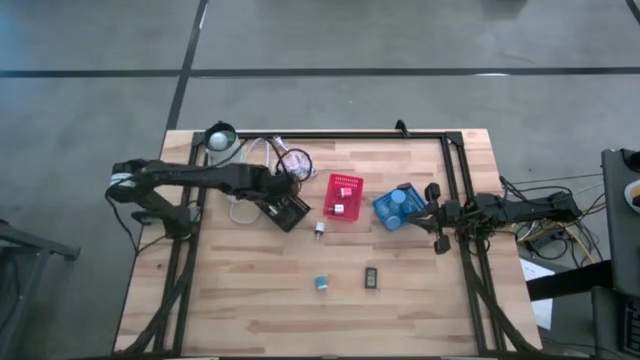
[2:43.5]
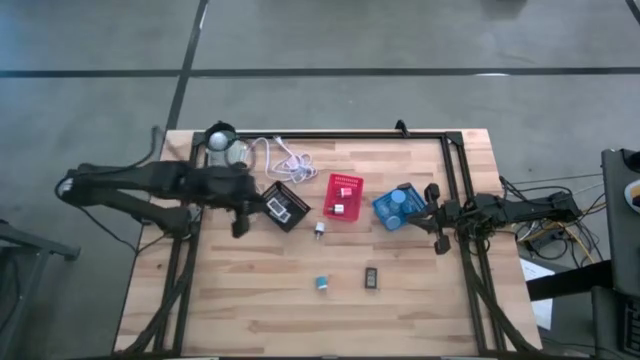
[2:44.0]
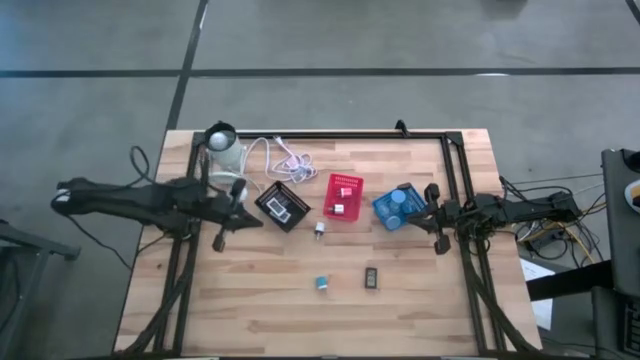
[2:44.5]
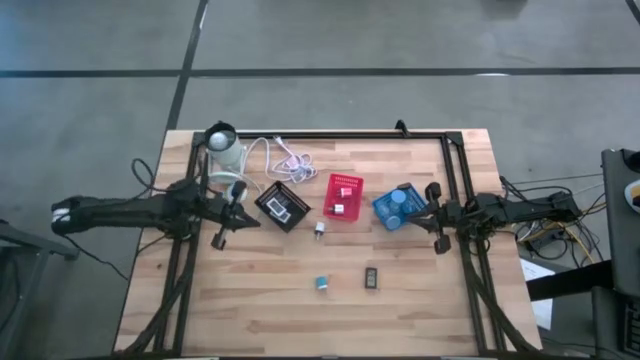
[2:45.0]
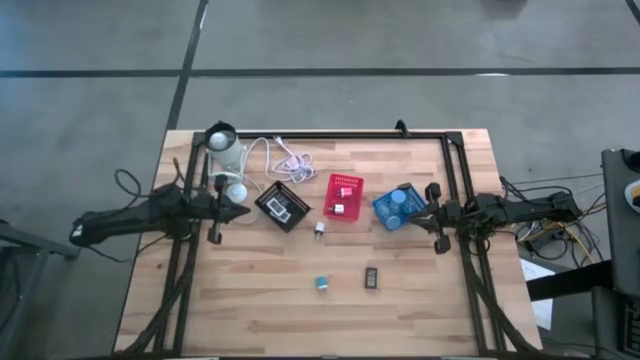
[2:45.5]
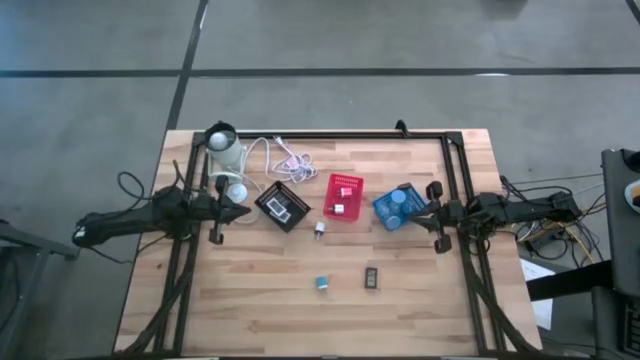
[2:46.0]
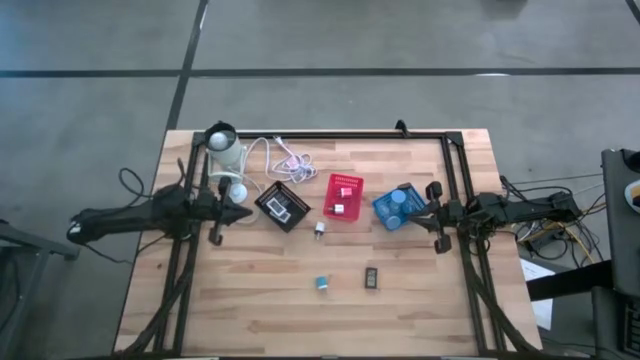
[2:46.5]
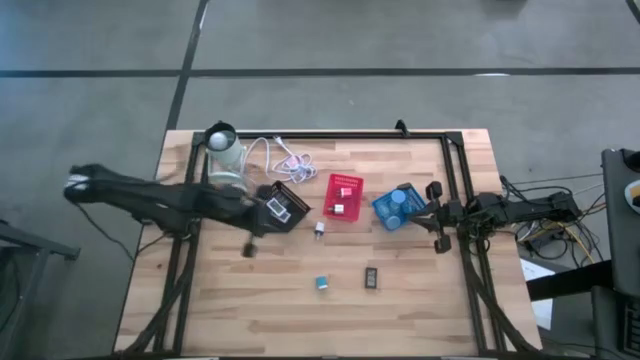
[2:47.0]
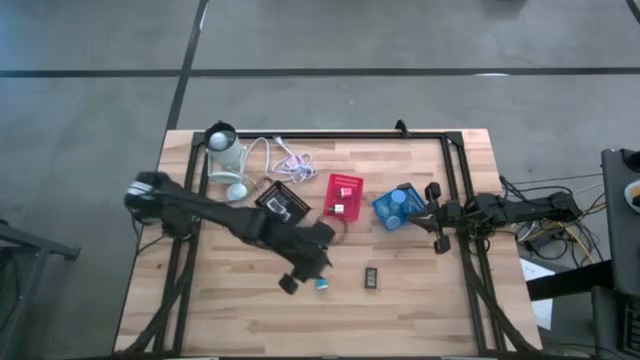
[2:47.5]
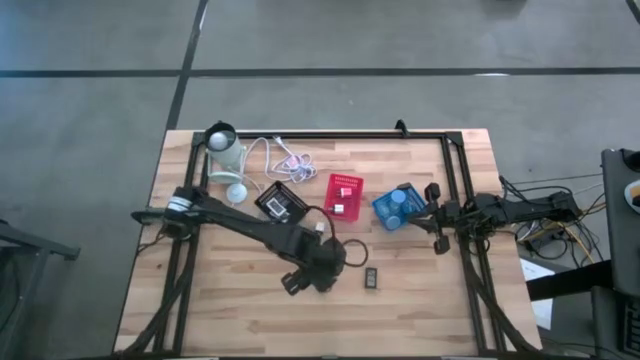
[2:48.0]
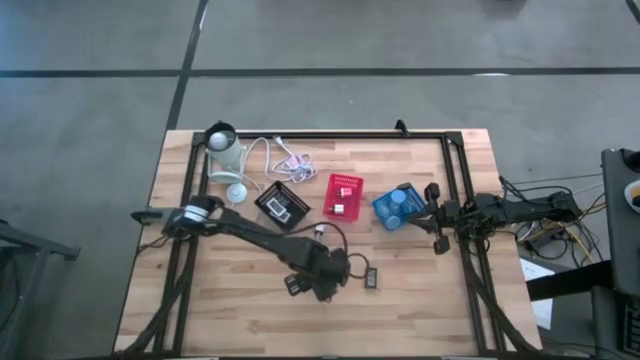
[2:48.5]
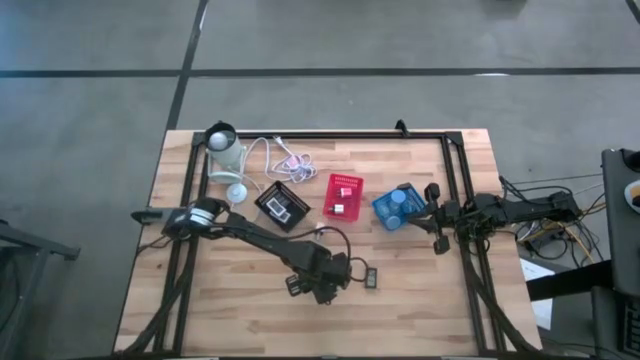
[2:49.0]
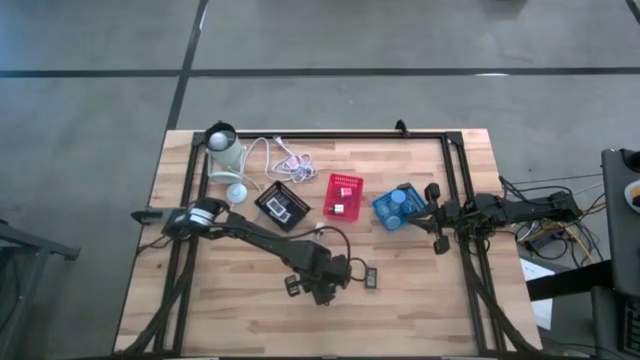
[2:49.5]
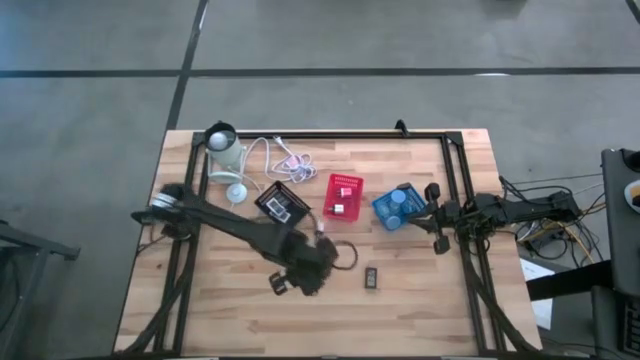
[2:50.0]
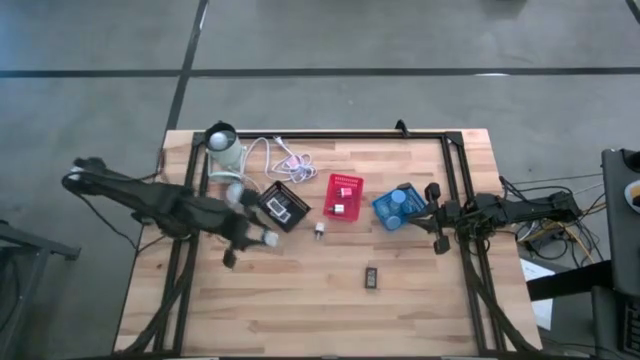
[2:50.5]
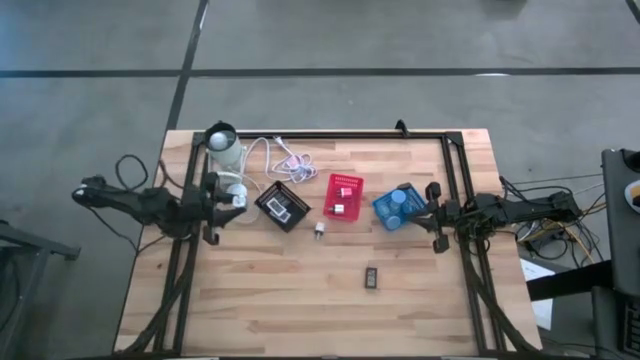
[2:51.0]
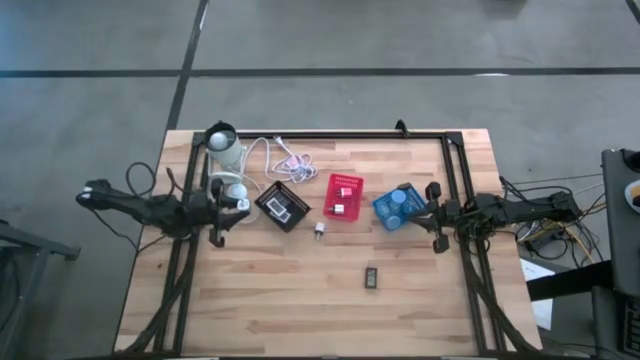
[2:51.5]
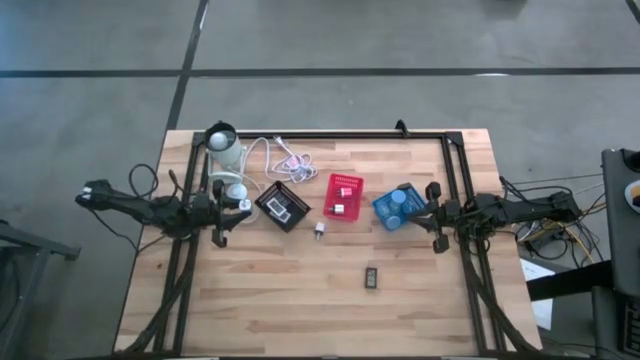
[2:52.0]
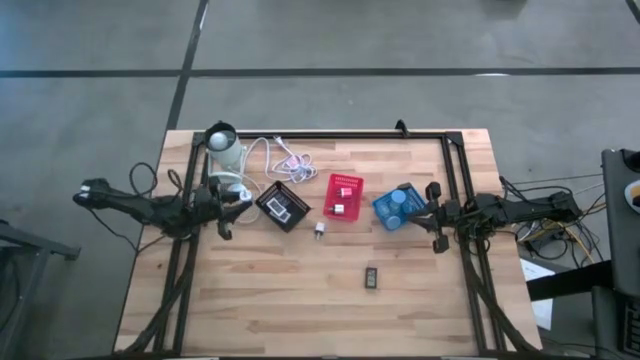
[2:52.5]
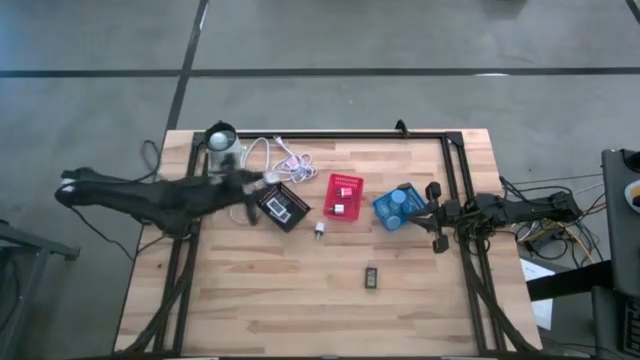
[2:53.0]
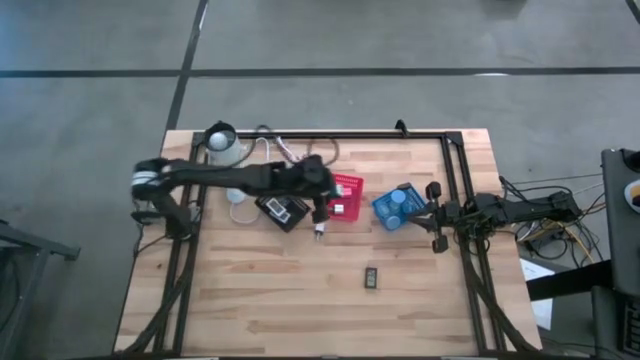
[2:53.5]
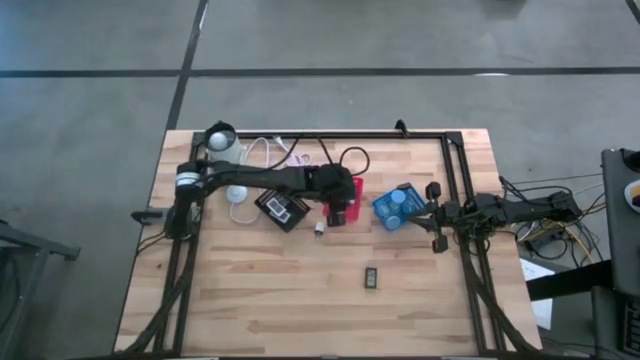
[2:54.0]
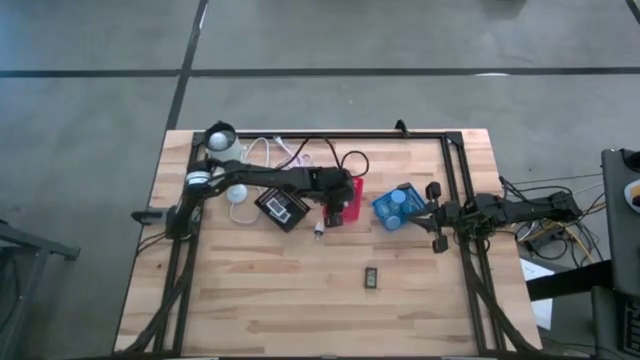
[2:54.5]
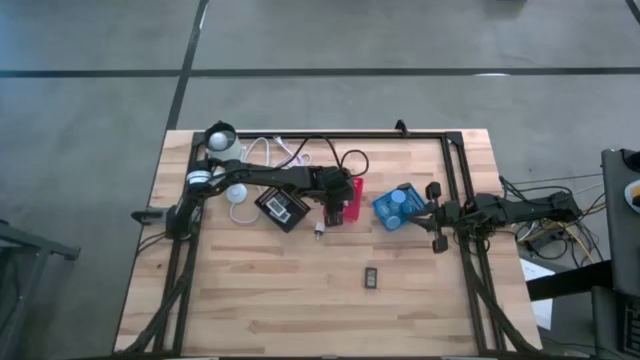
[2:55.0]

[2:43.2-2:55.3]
Task: Pick & Place Office items
Put the blue charger adapter into the red basket

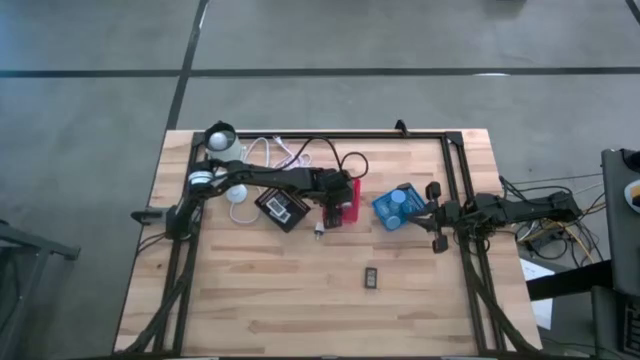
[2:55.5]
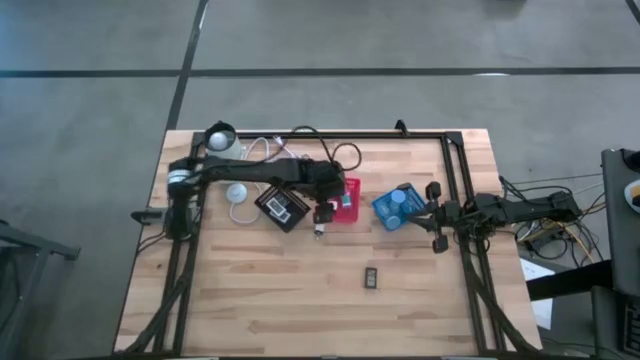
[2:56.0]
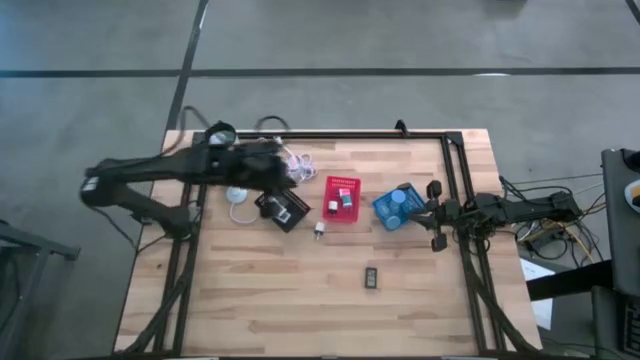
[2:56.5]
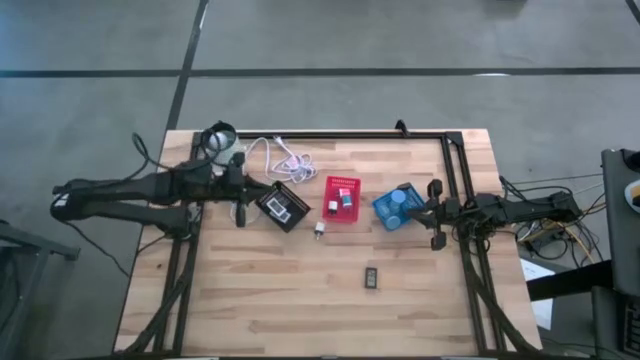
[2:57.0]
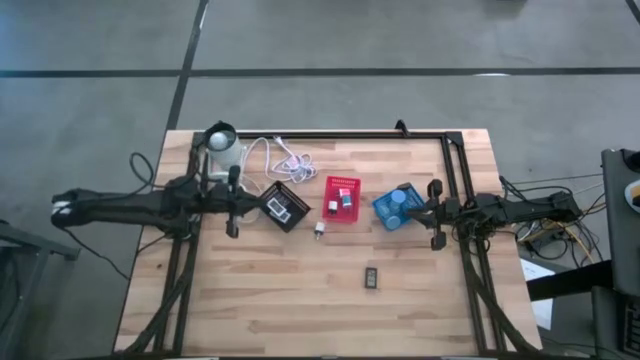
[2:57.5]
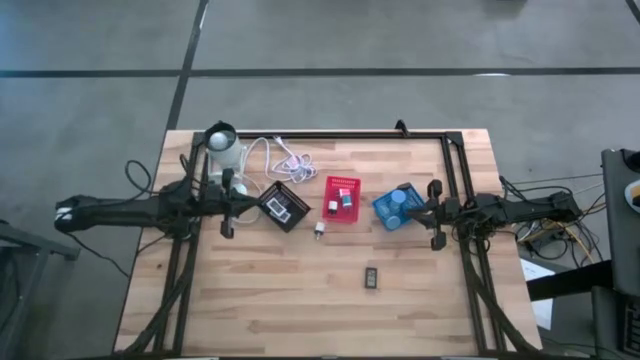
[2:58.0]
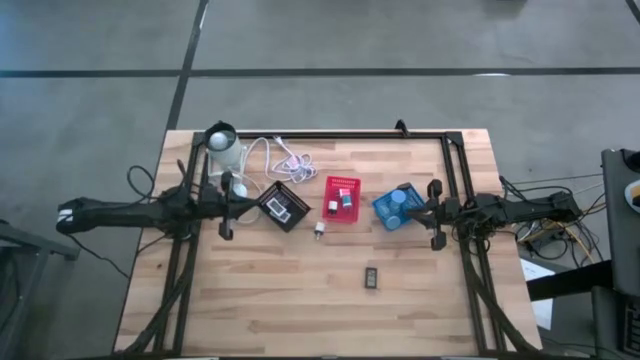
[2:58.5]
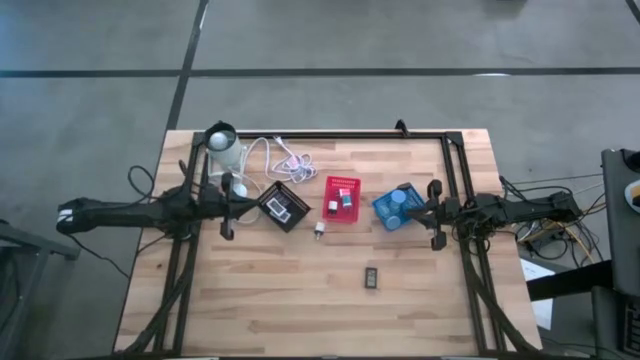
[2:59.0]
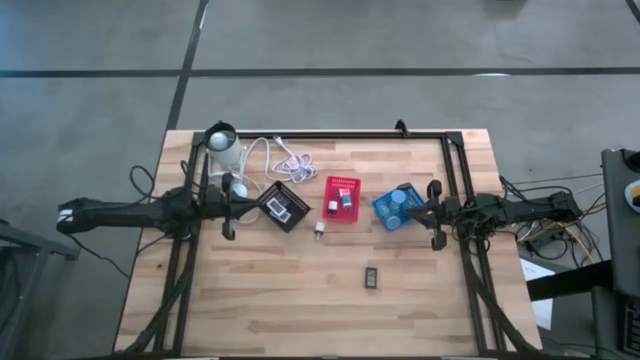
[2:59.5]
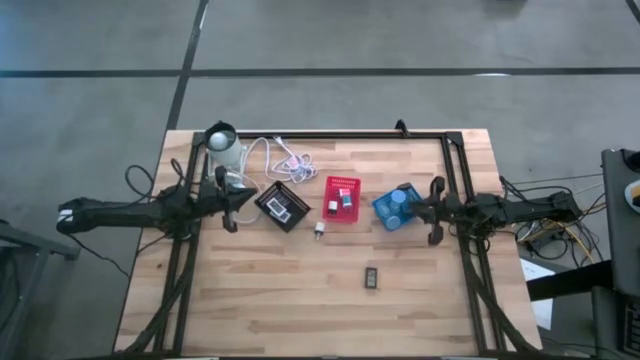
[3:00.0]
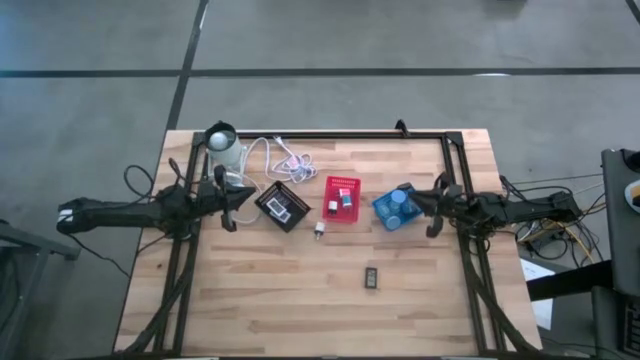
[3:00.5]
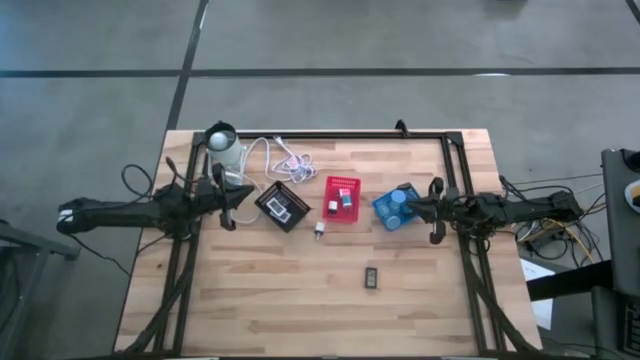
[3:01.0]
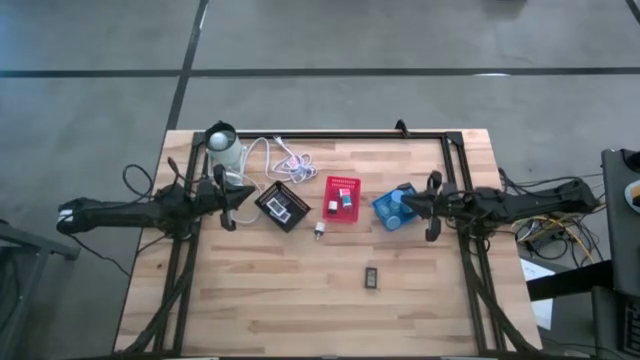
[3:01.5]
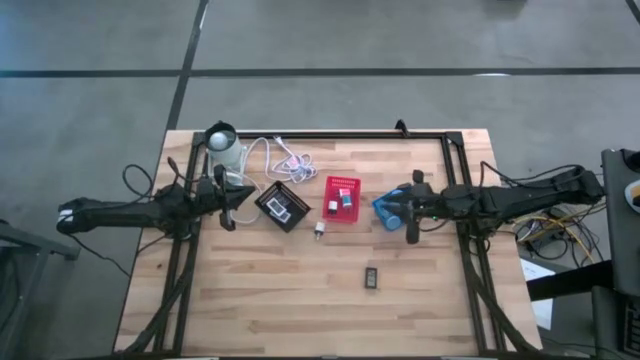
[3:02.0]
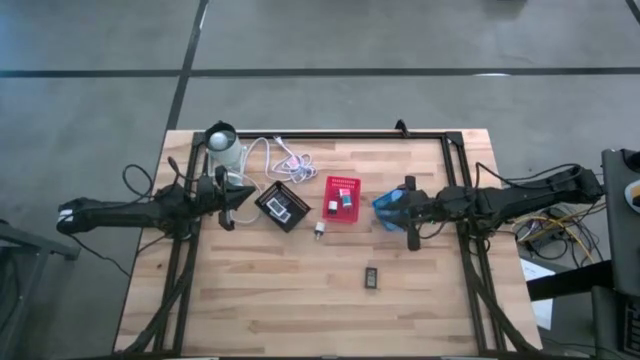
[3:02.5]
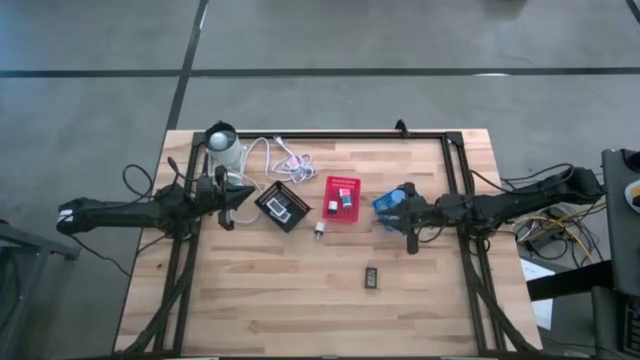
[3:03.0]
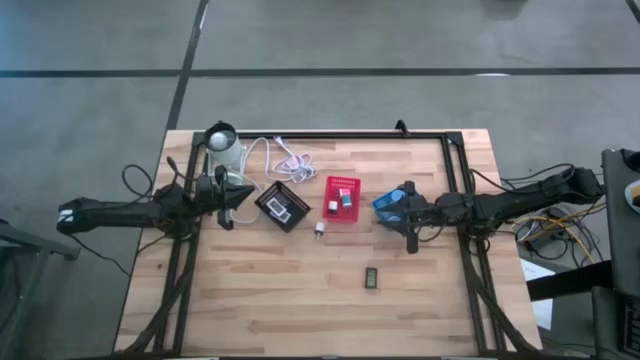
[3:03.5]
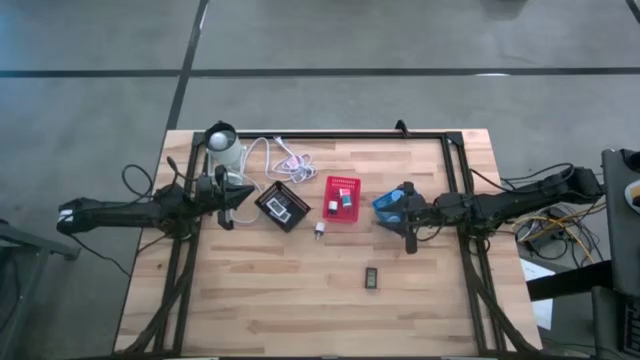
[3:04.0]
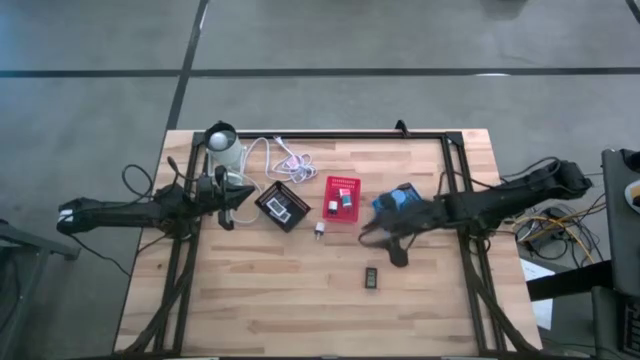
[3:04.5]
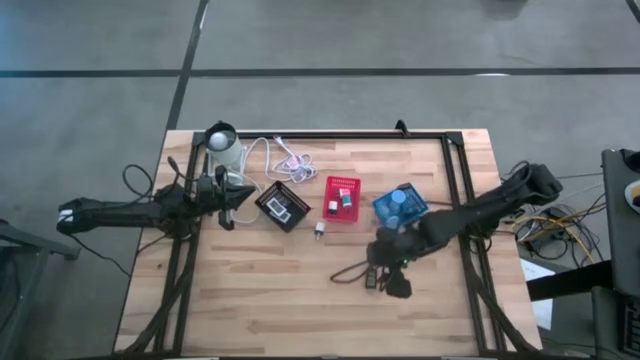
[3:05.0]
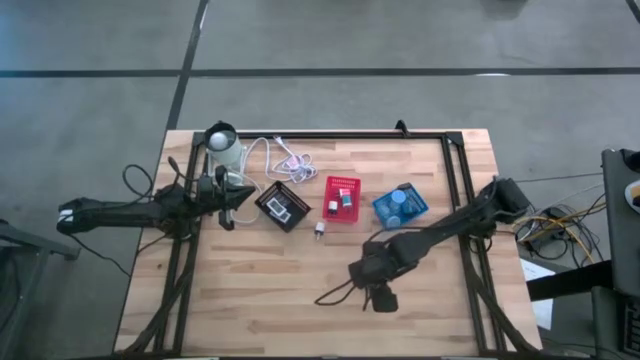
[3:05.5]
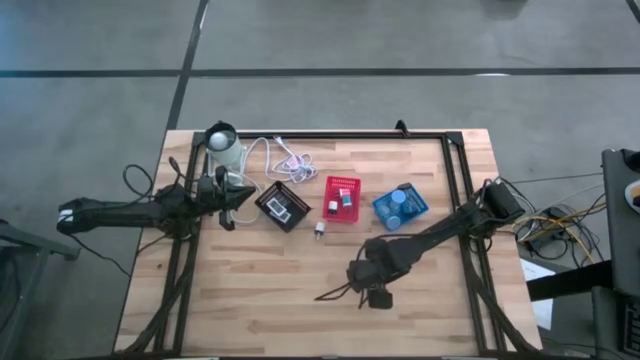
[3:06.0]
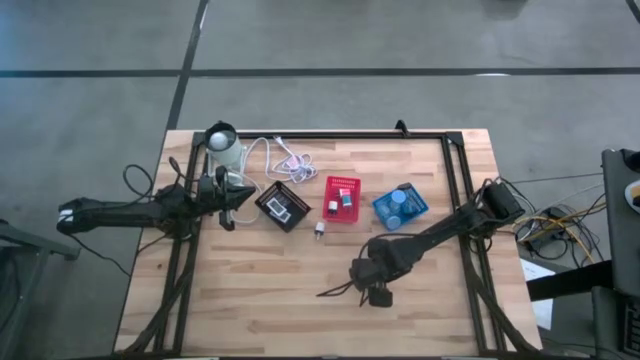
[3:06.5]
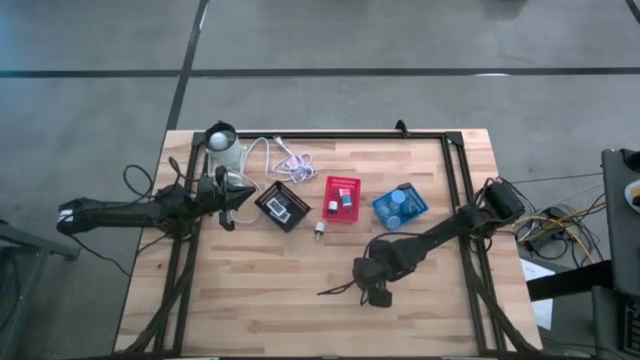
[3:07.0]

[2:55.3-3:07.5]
Put the black digital clock into the black basket
